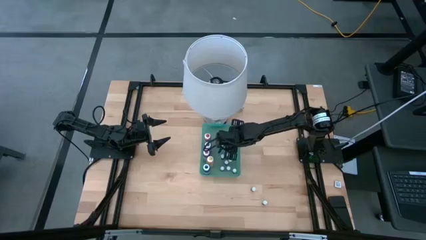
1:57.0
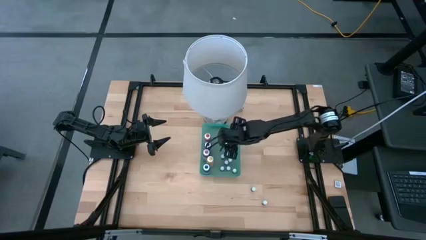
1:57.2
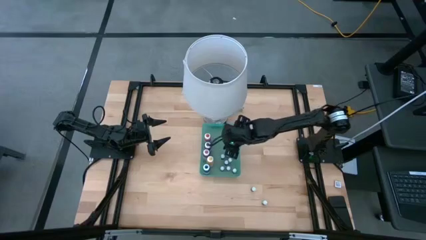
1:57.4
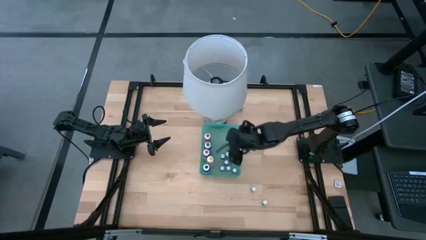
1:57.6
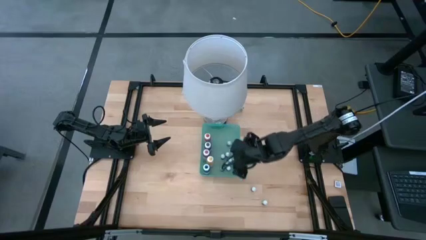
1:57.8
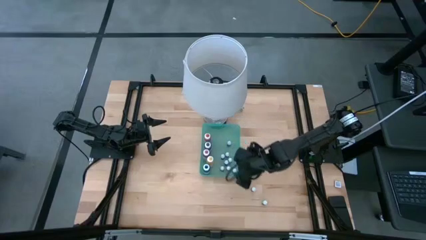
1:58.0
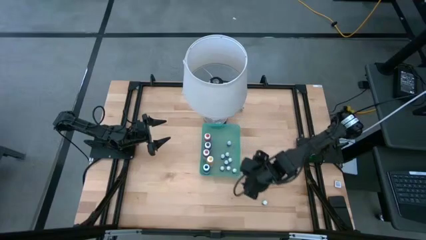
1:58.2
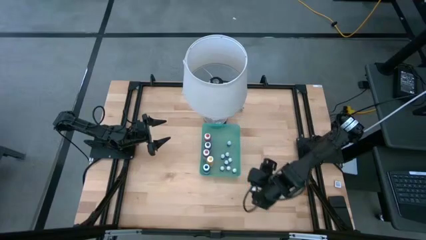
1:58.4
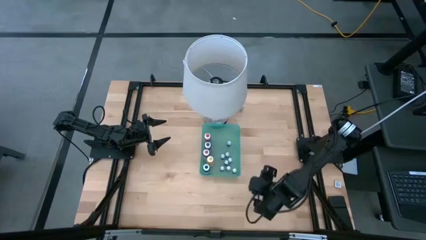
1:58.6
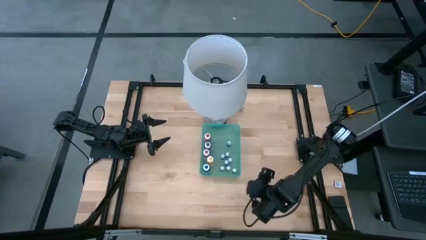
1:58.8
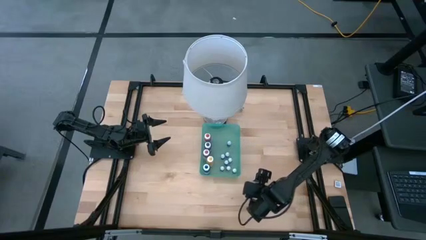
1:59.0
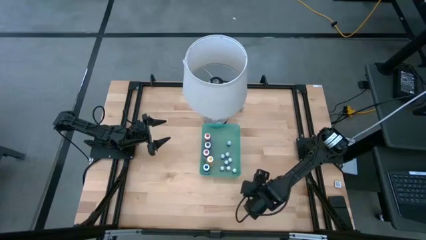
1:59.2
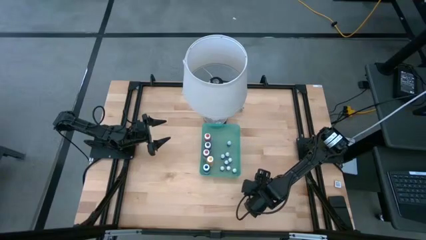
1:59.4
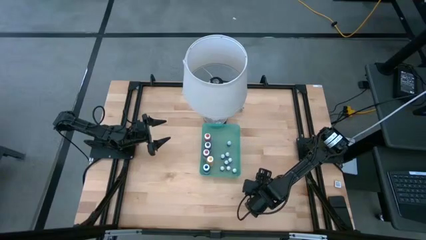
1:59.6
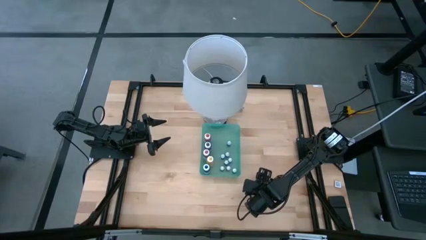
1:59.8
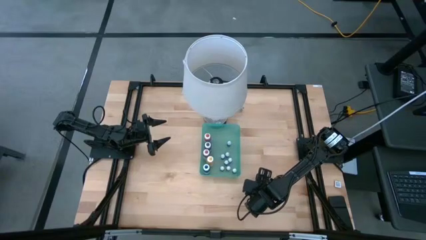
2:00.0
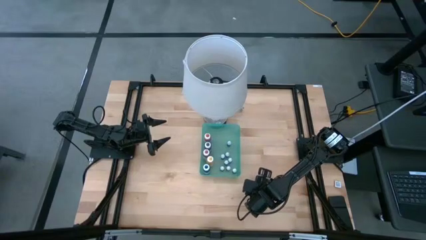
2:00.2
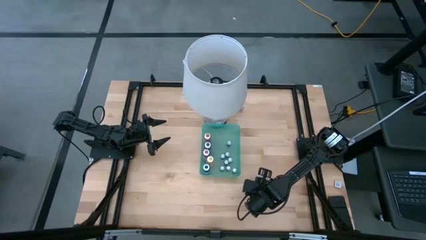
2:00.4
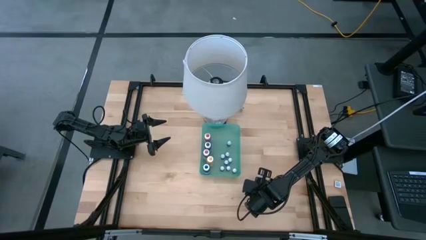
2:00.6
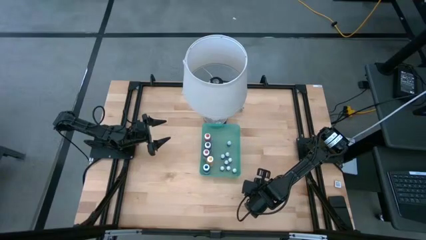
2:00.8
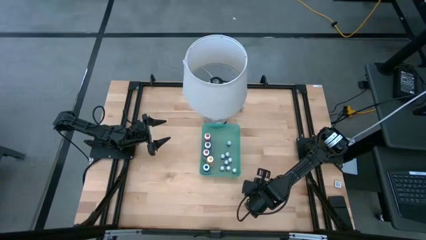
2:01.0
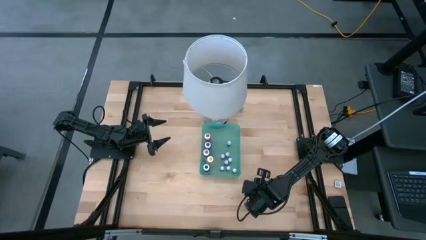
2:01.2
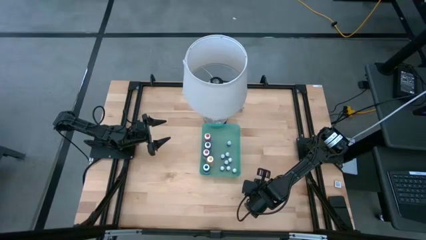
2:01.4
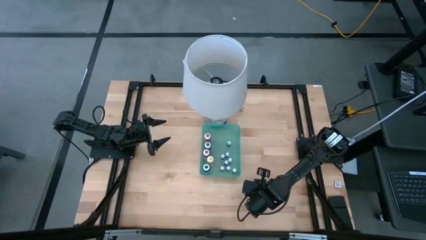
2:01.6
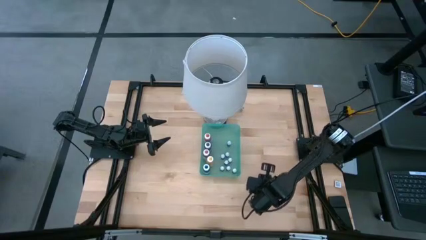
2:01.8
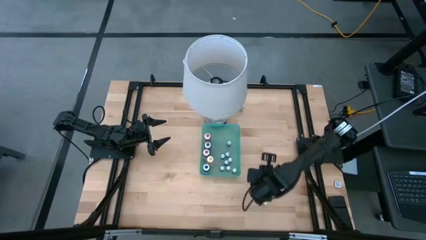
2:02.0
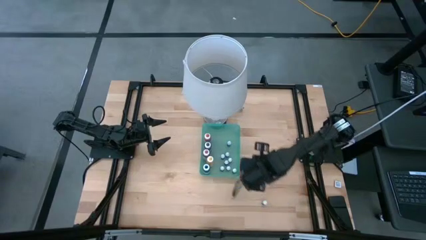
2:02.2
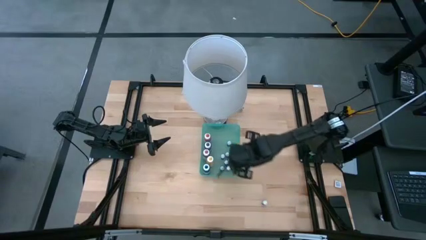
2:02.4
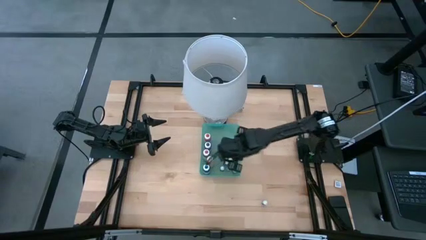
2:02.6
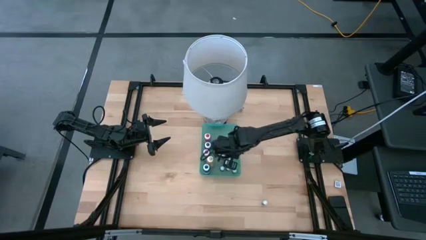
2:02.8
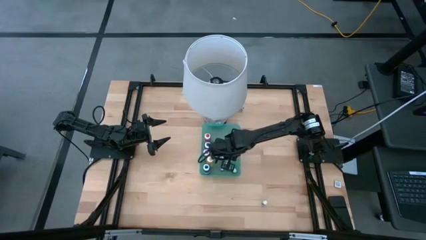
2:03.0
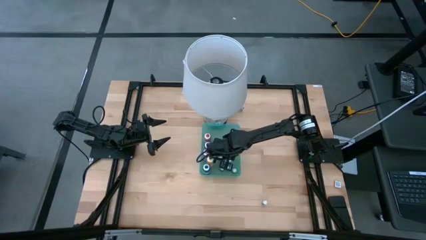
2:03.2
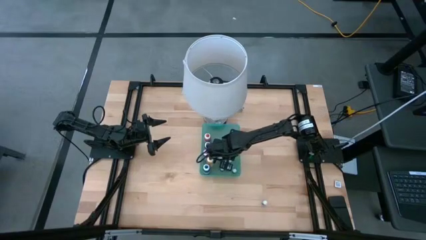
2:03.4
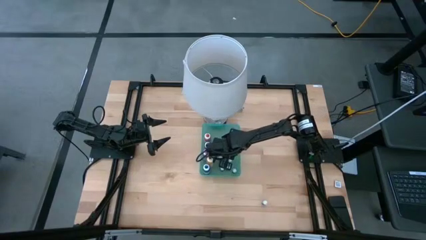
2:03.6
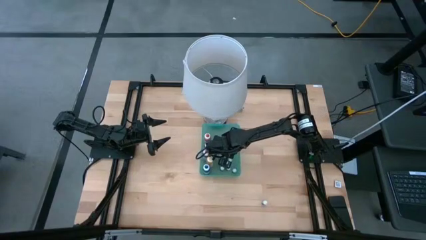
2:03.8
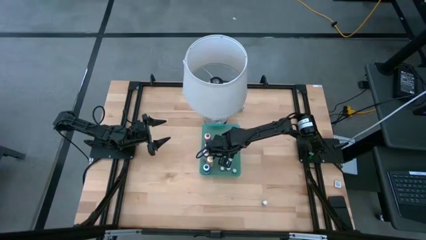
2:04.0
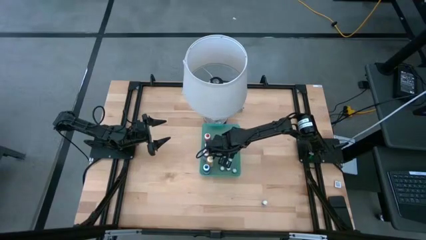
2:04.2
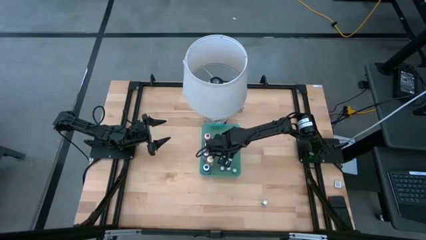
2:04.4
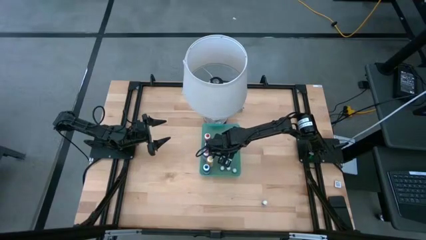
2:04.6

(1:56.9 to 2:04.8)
Task: Pick & Place food coloring
Put the top small black food coloring bottle into the green bin

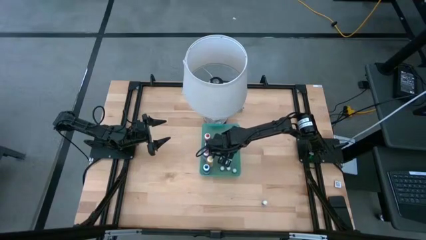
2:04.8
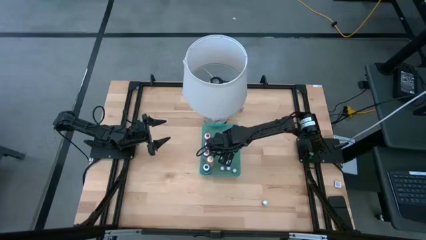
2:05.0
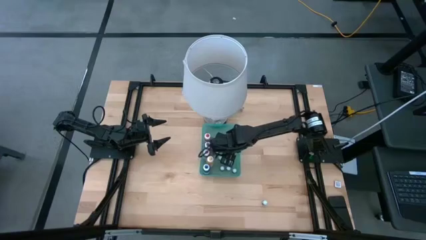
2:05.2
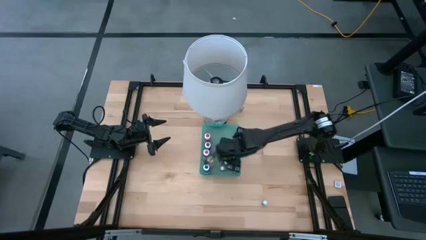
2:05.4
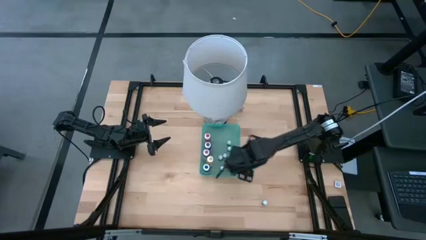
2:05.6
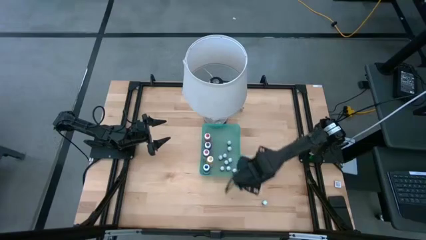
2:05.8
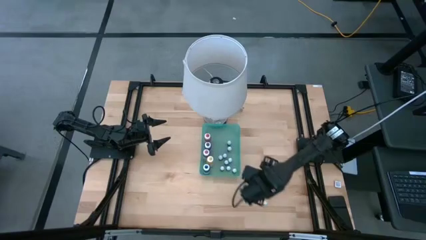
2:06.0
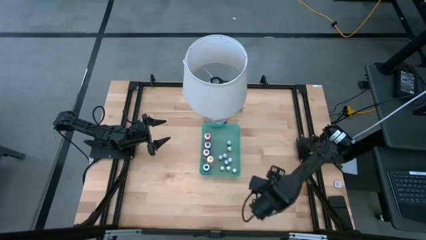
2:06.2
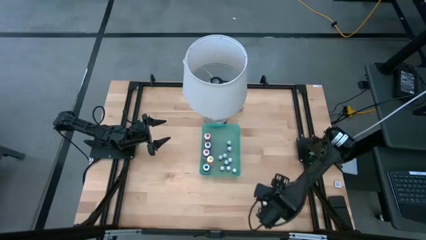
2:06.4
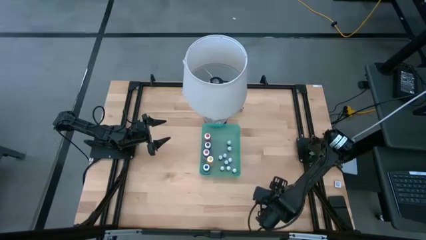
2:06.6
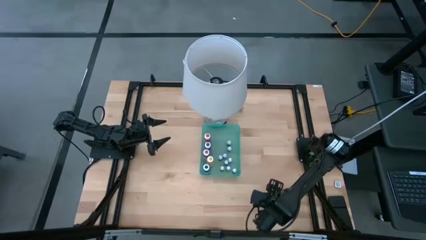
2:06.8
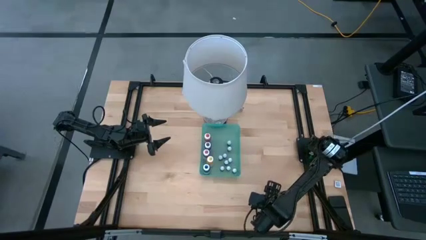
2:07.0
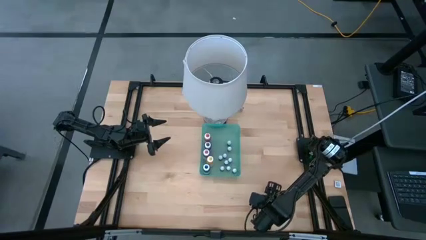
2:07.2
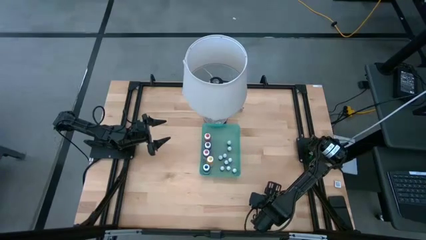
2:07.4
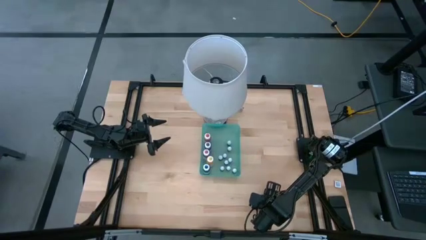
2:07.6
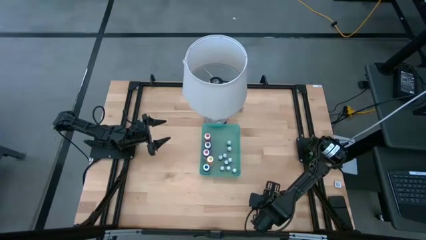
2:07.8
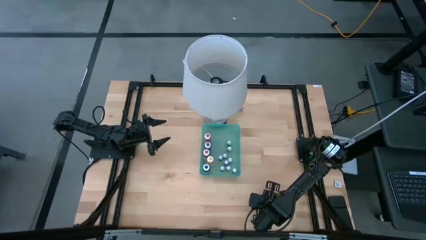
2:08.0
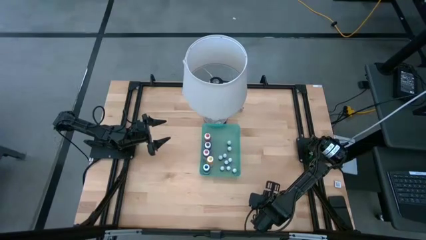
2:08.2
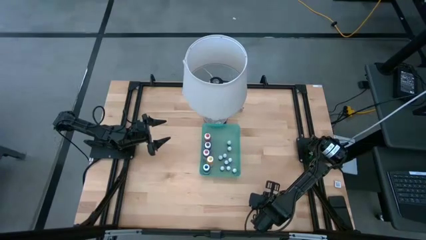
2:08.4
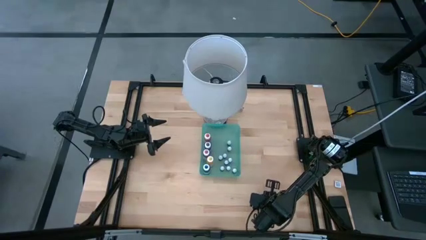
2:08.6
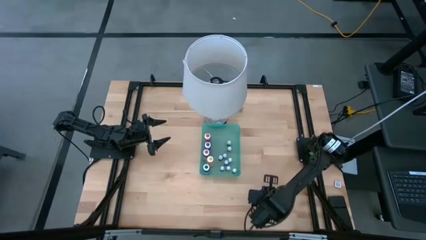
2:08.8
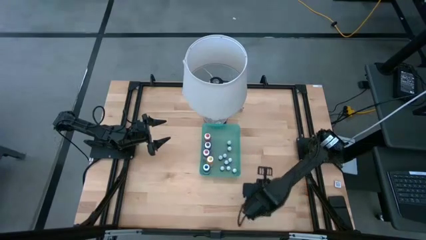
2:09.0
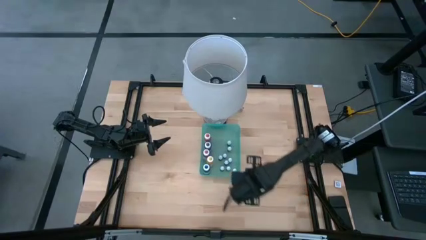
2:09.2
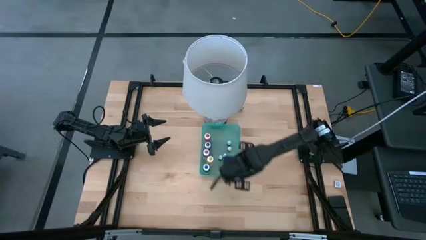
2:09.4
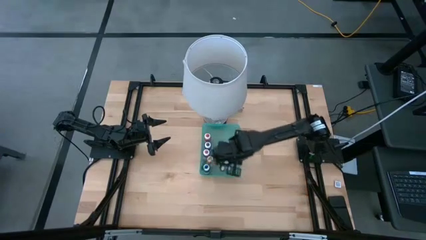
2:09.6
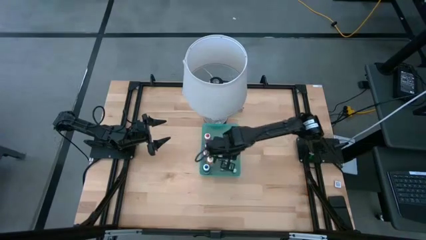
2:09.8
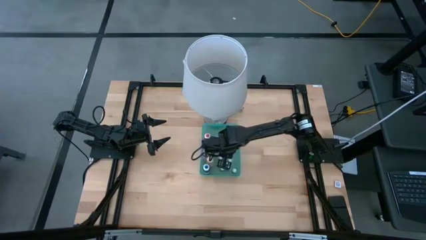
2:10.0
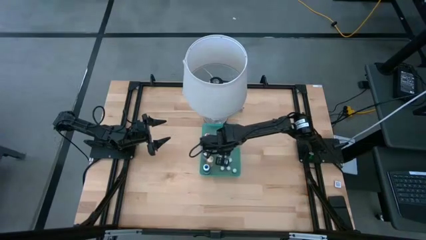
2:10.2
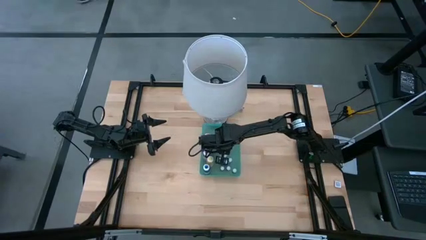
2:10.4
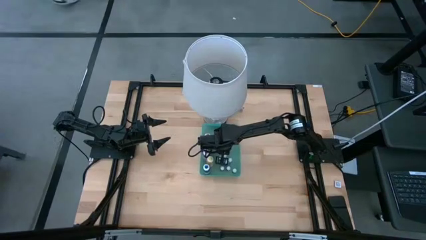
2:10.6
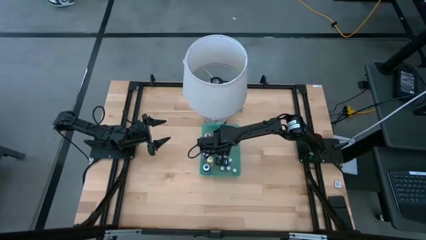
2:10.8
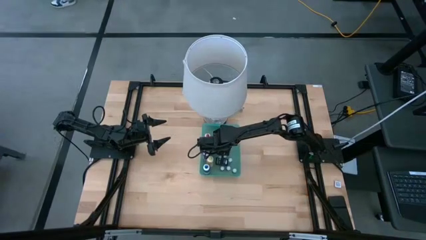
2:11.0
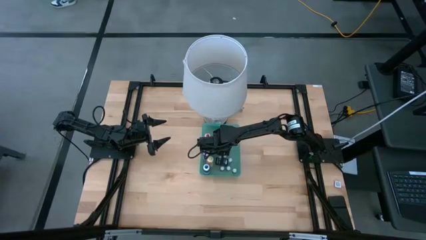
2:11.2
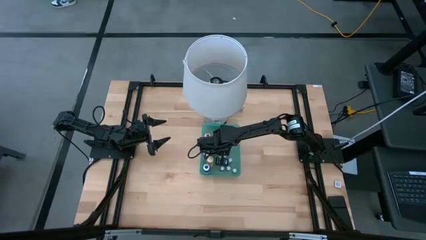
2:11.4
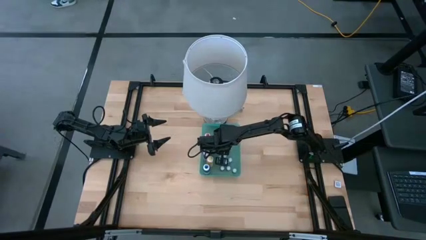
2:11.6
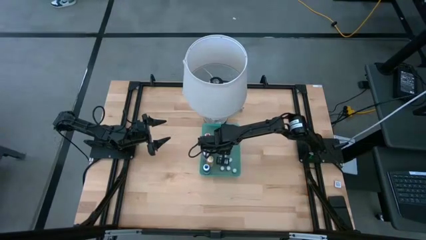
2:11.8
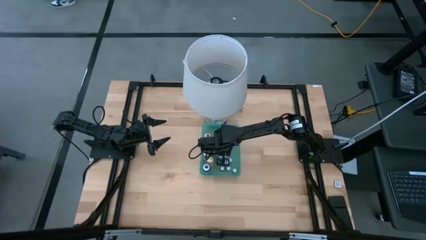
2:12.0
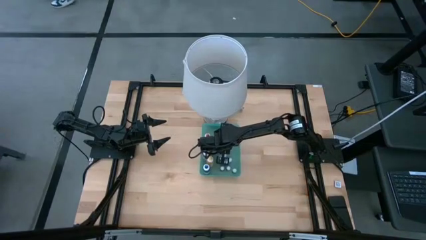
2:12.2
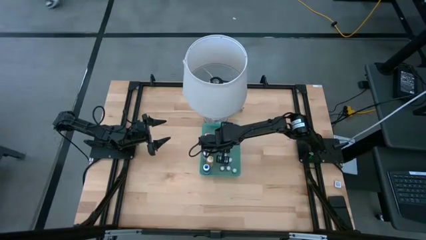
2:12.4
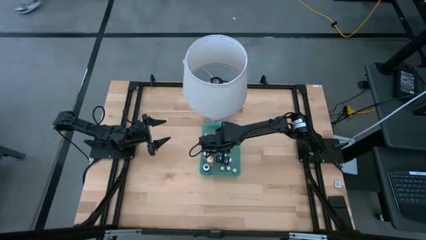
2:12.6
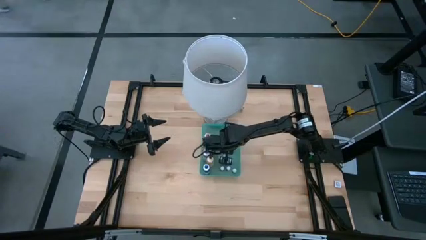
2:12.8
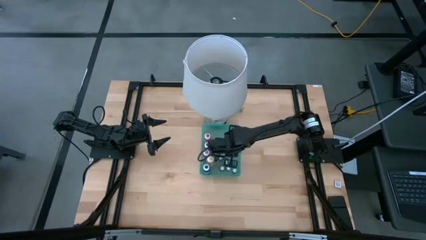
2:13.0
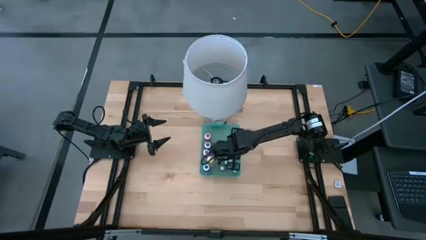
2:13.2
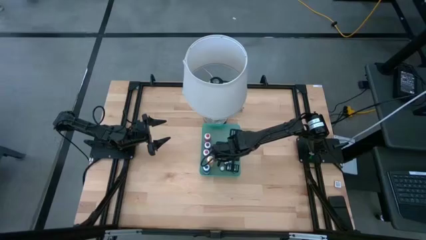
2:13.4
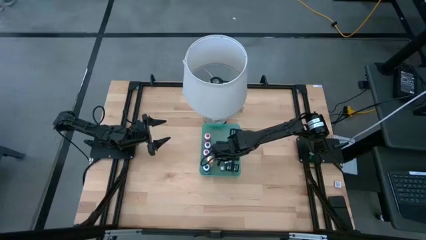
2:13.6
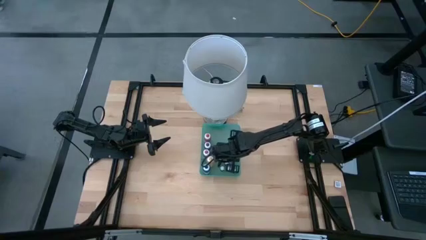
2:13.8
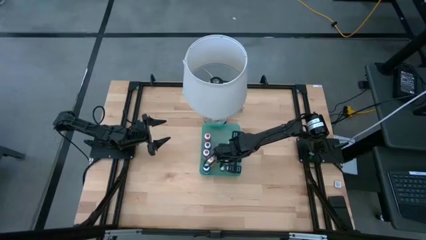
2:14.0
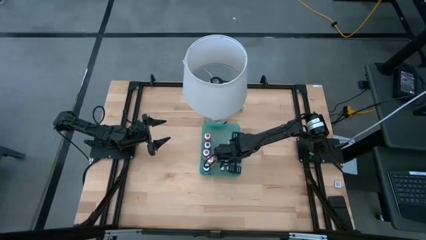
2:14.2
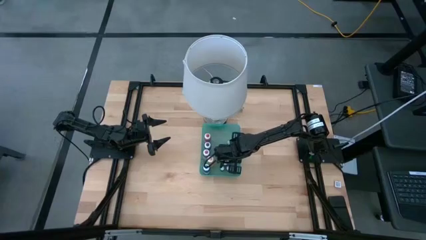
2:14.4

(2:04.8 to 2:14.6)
Put the small black food coloring bottle into the green bin
